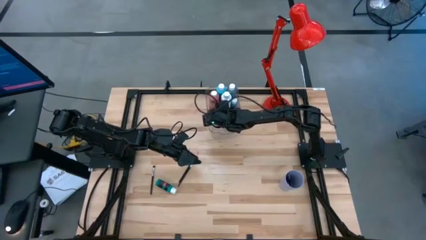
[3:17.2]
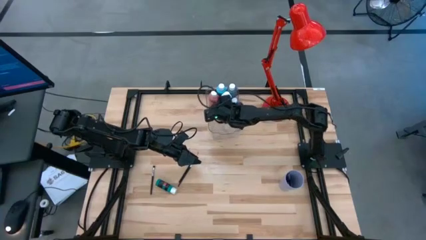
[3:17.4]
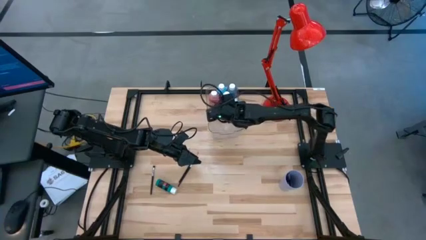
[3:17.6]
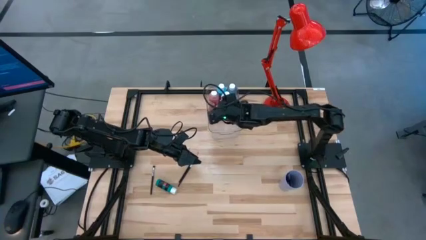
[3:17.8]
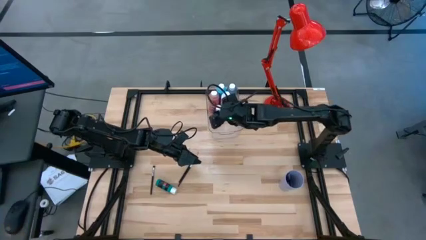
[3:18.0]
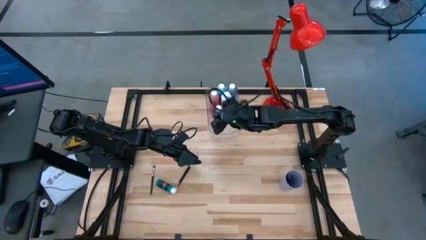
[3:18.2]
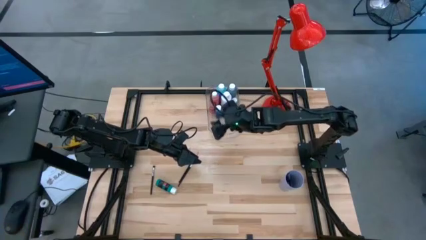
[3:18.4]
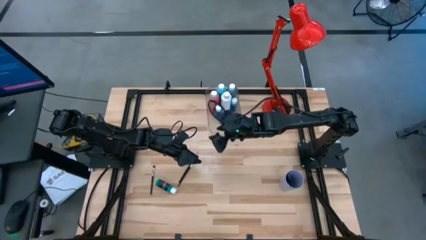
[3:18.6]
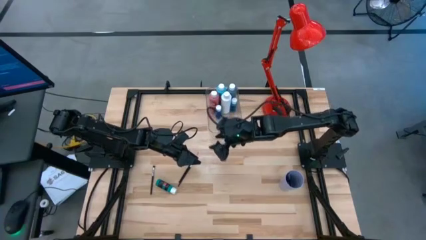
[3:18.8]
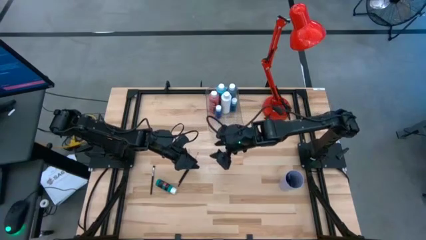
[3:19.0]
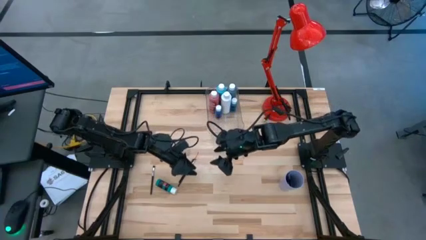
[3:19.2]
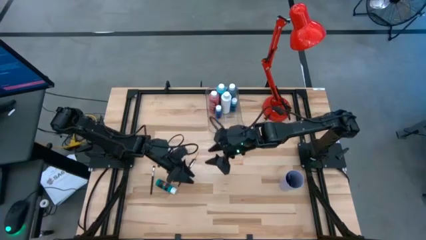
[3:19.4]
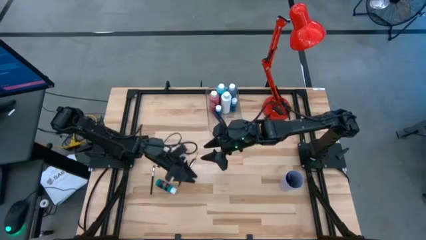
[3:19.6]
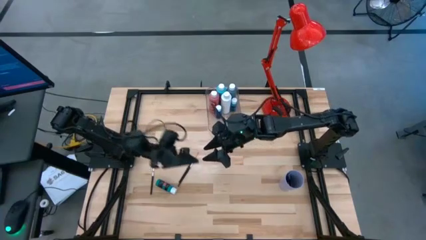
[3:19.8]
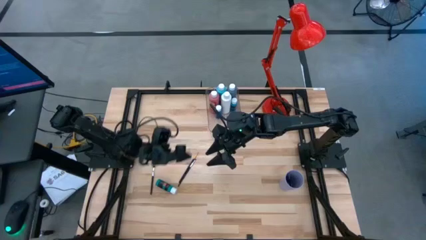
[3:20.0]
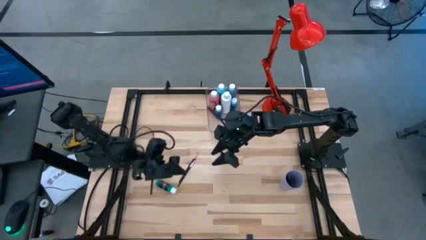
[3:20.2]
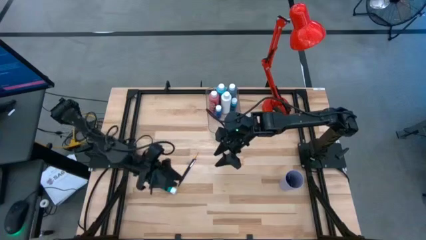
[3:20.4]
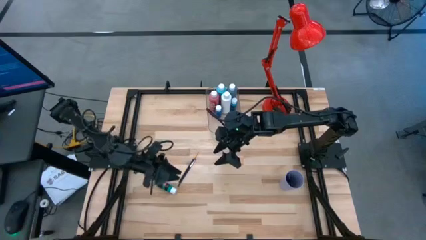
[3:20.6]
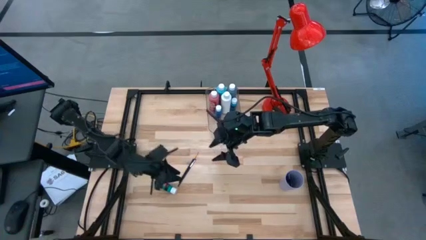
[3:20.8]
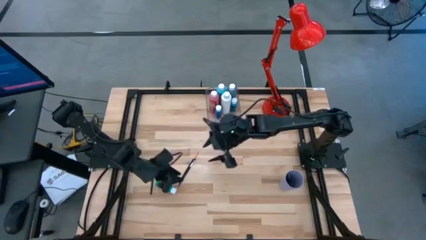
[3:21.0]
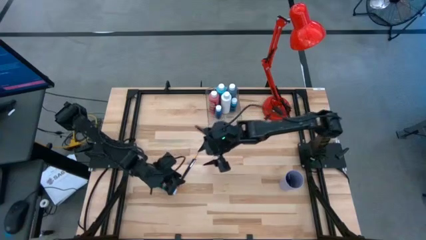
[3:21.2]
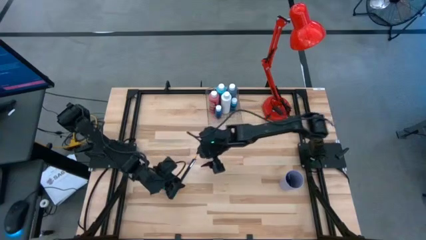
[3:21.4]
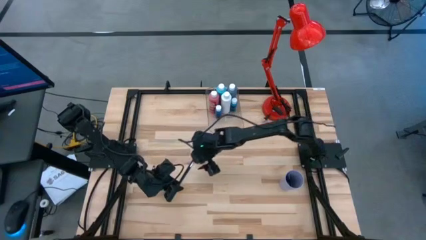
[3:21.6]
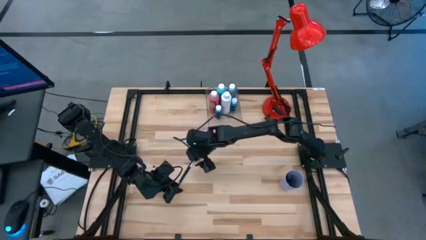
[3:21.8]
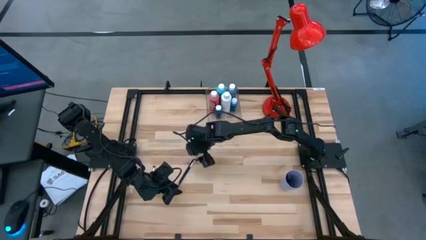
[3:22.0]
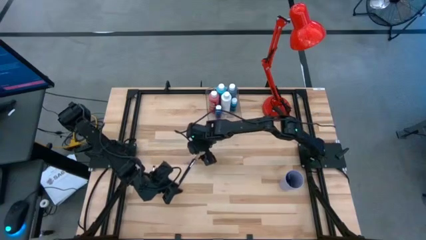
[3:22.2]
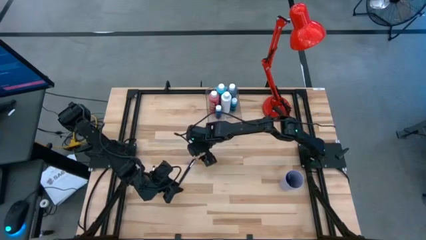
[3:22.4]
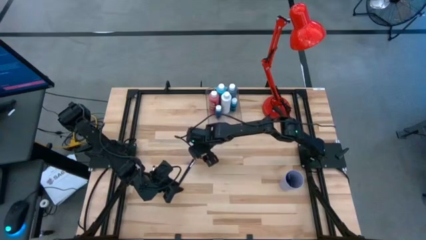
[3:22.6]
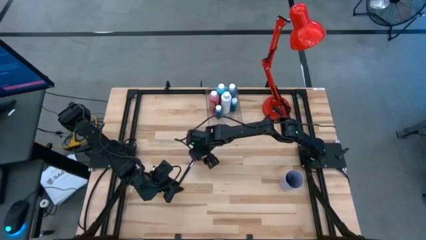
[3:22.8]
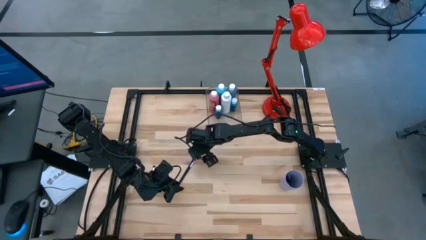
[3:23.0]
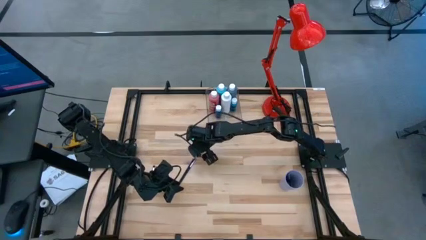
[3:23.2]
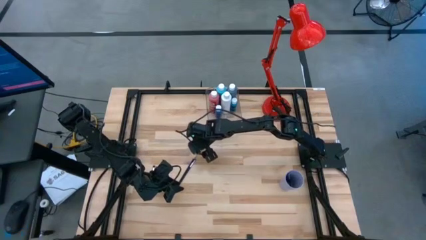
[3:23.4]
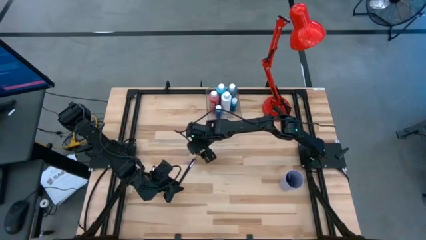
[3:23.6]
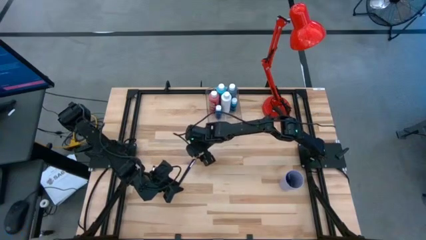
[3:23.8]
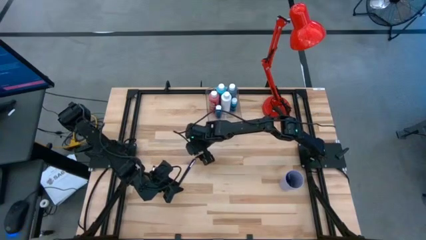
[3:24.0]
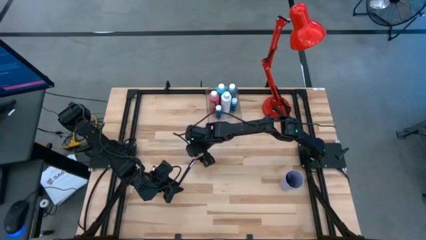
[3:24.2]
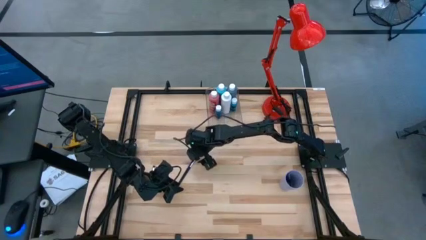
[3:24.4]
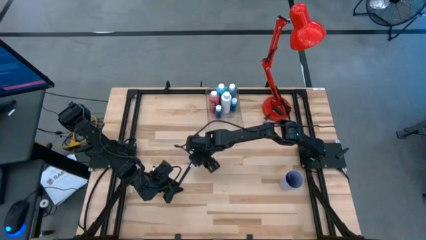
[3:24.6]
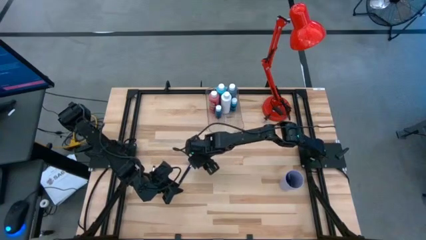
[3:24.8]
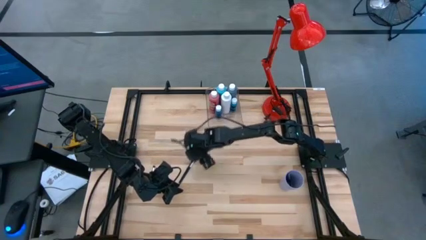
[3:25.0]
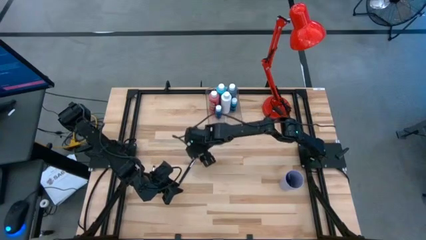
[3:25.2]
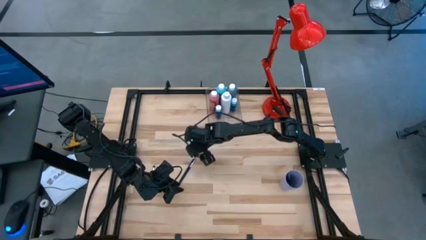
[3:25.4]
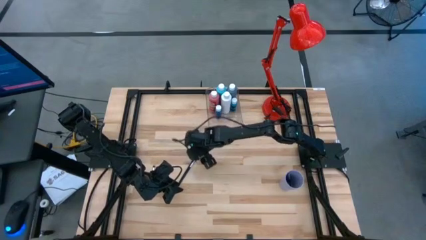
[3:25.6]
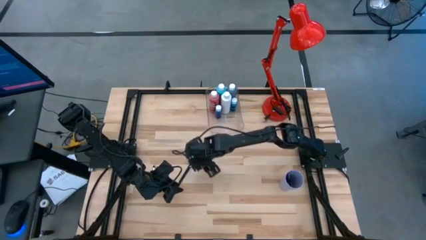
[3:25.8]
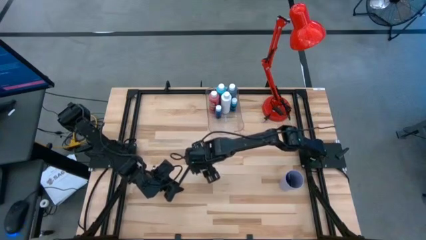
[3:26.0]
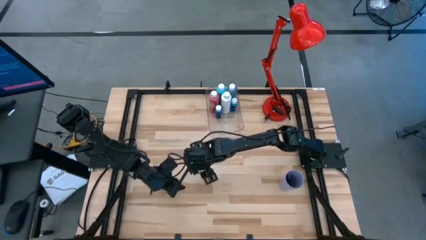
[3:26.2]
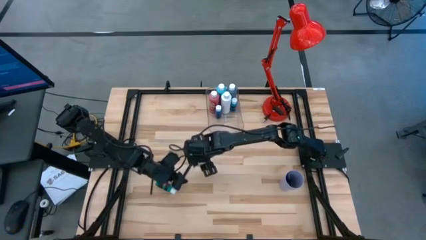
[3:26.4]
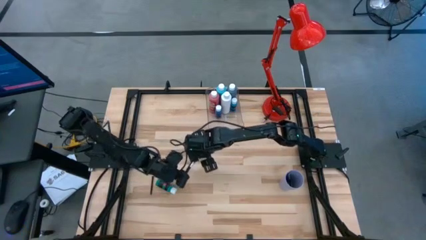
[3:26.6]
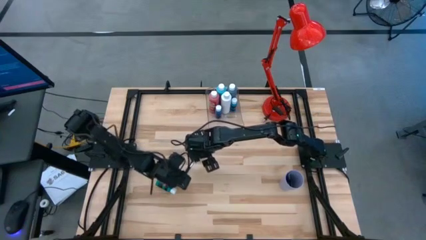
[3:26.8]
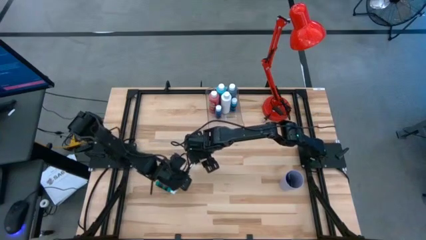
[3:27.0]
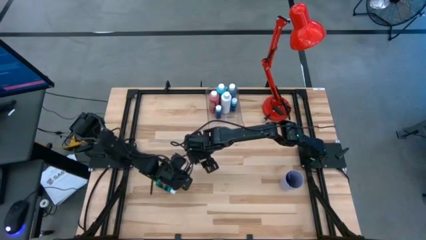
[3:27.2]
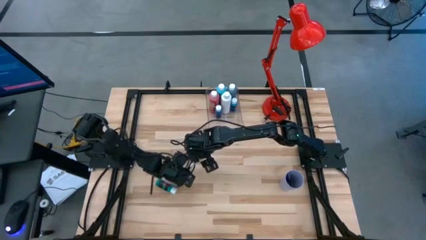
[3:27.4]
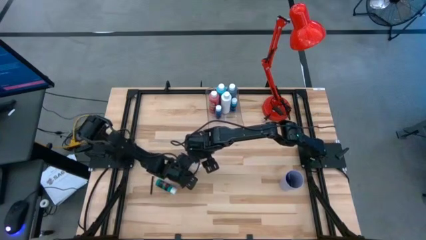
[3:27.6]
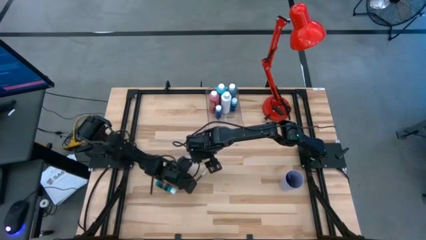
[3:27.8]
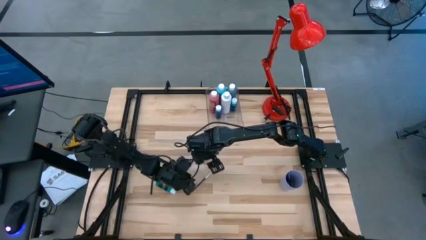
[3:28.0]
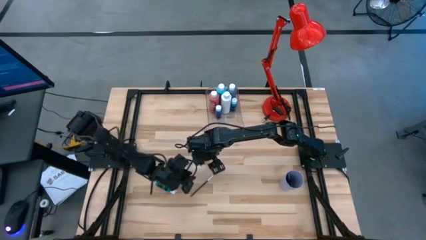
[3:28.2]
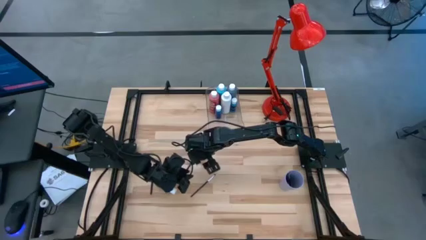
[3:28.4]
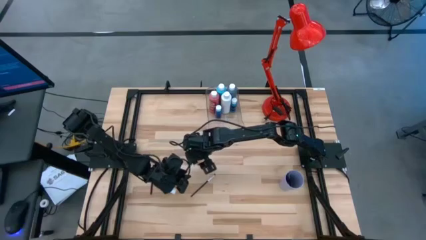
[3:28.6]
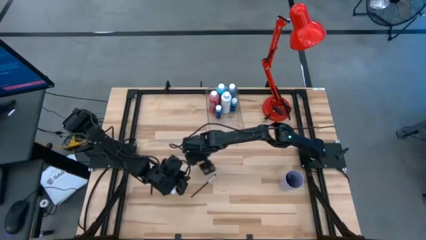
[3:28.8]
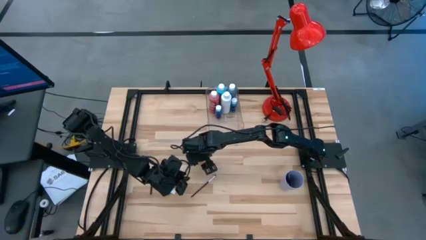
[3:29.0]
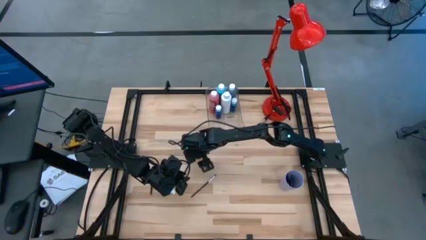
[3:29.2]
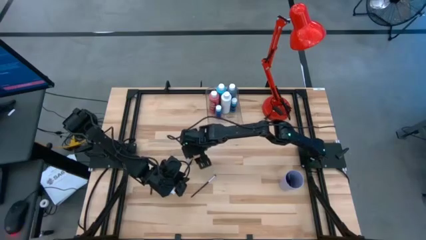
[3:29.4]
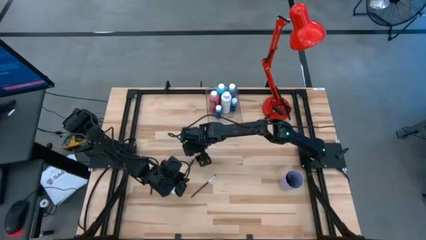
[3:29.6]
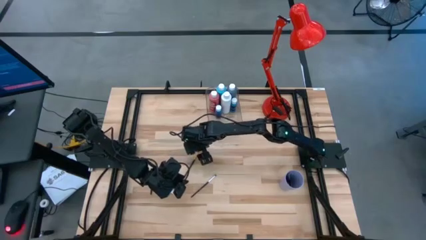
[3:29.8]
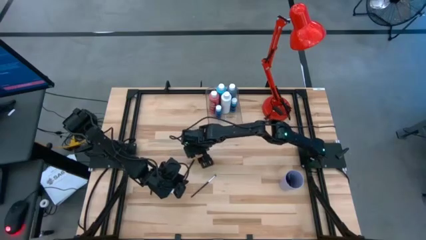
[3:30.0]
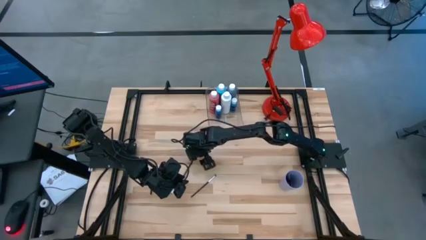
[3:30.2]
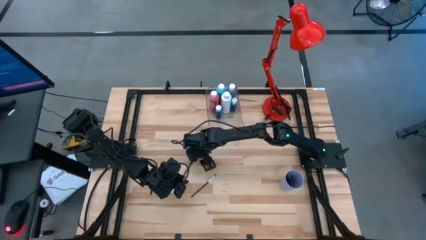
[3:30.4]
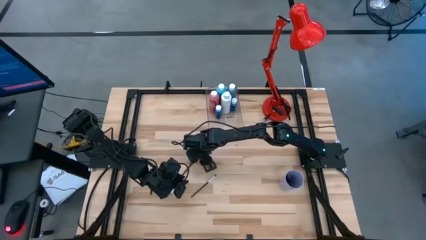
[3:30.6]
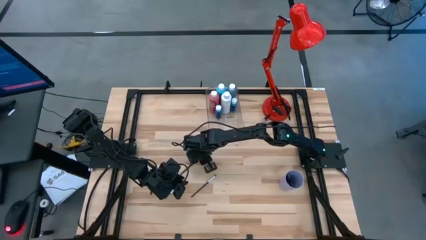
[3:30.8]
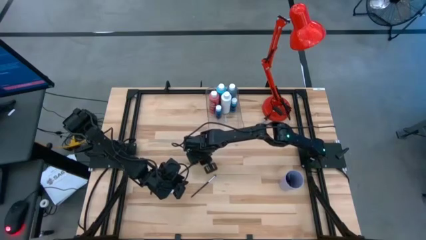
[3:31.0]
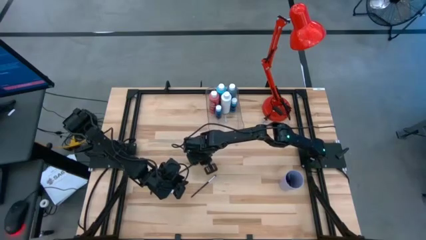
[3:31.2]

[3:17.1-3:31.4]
Task: Pick & Place Paint Supplies
Put the gold paintbrush into the purple cup
